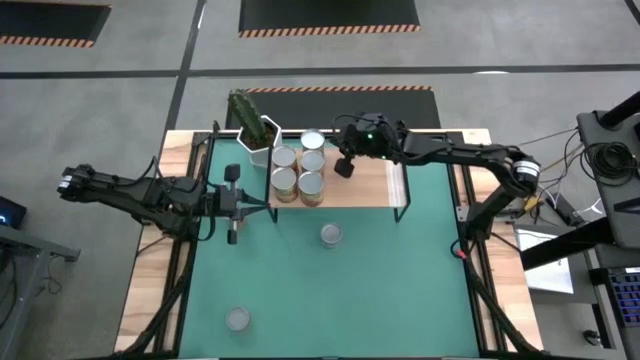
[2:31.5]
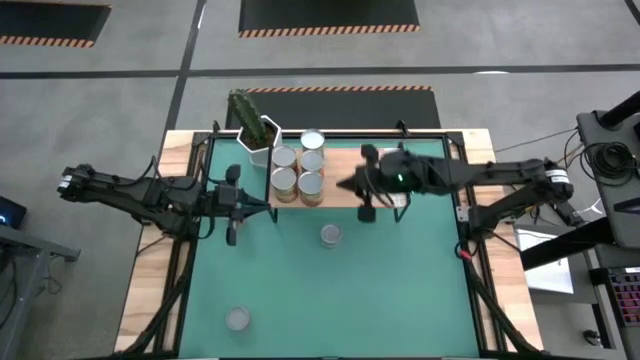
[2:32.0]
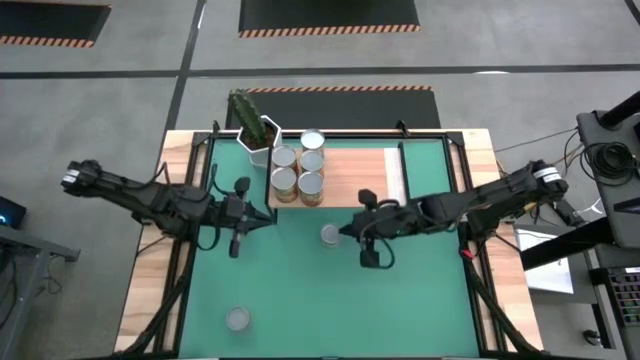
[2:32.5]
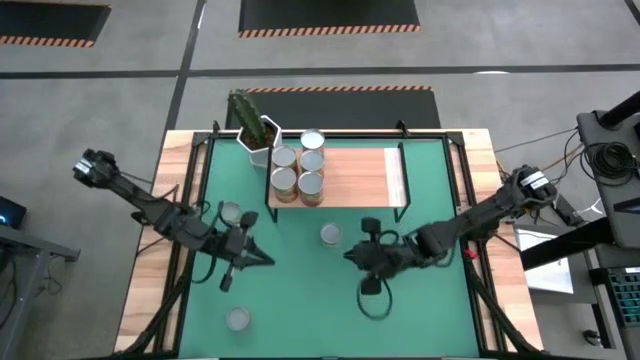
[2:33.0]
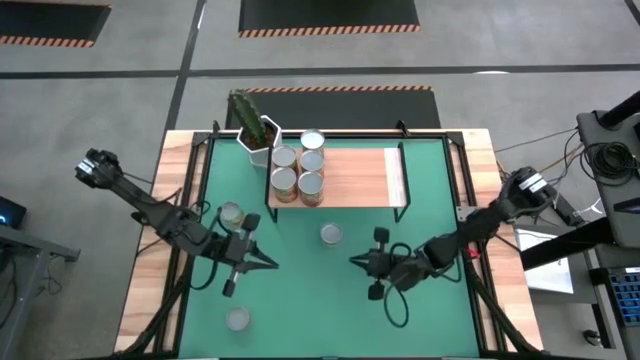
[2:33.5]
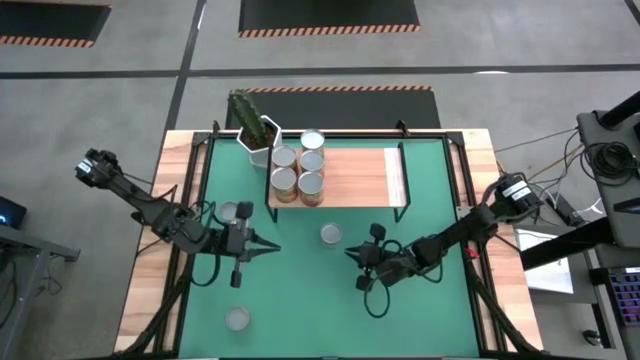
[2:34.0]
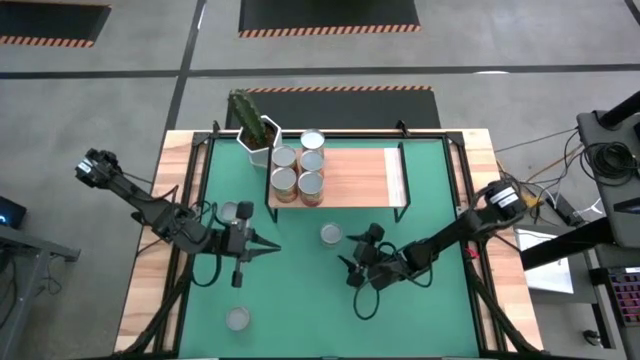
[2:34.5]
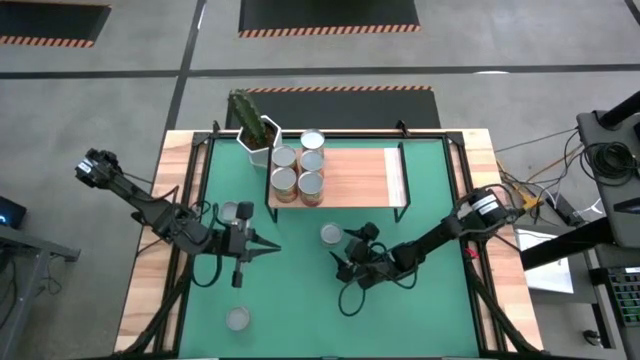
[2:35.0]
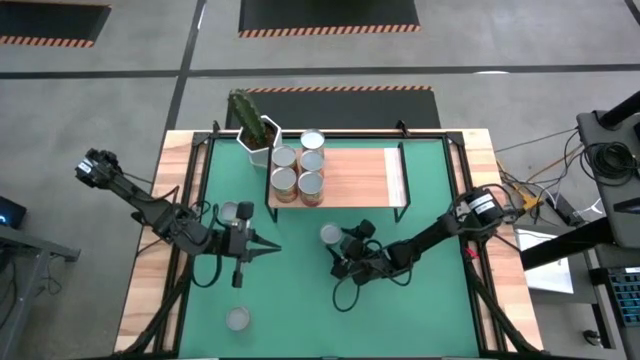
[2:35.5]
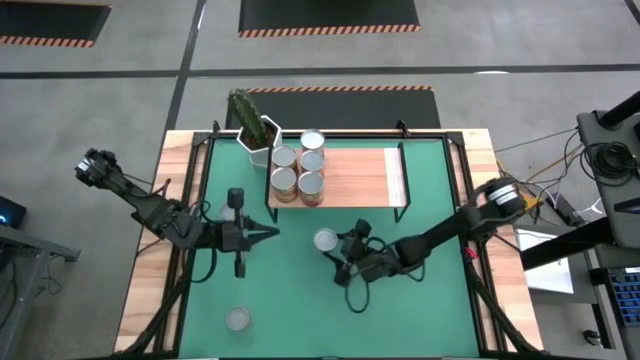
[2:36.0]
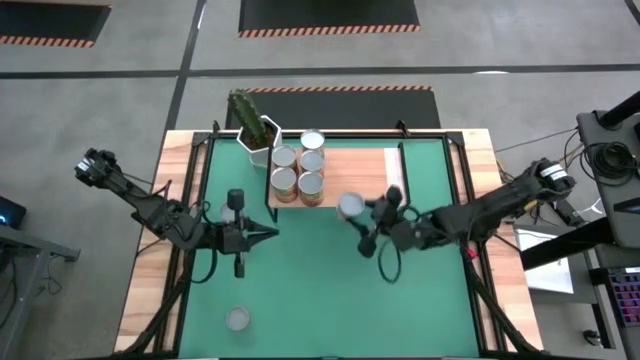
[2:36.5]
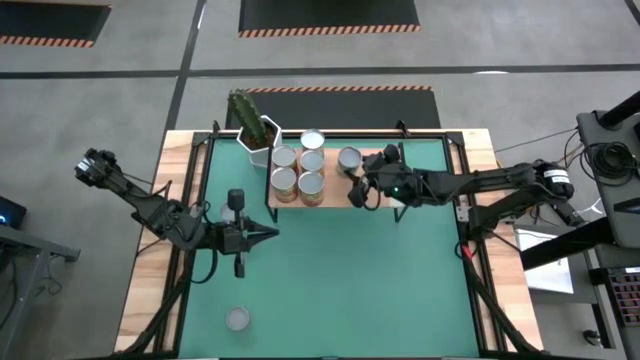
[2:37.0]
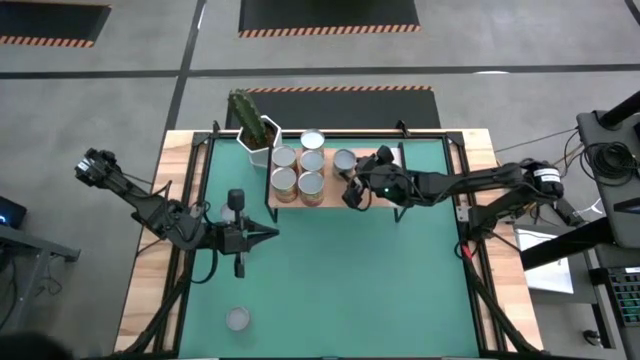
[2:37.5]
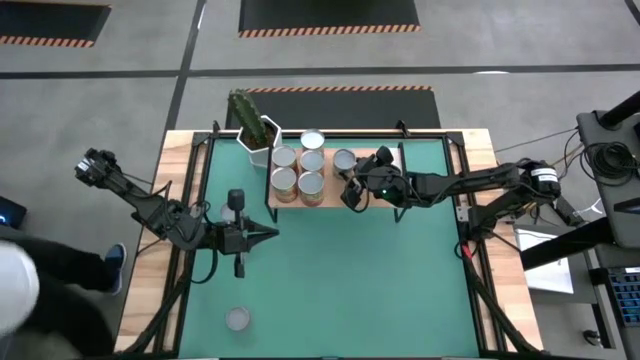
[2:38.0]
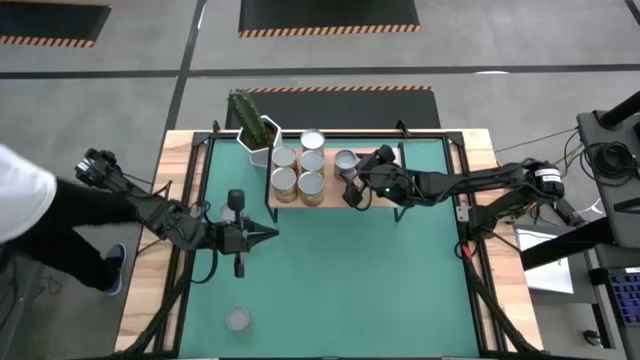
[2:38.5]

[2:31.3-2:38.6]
Task: Pick and place cans onto a shelf
Put the canned chicken soup on the shelf

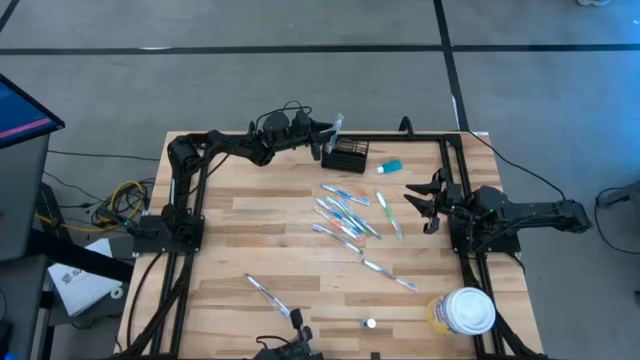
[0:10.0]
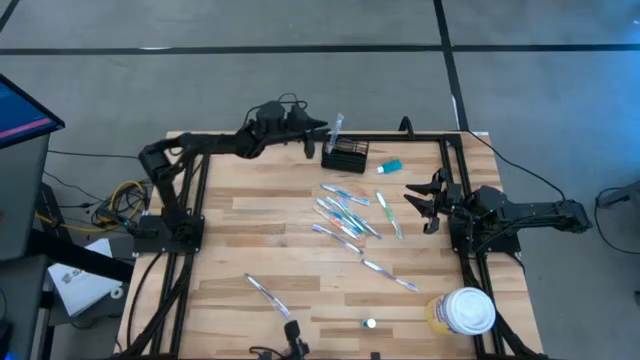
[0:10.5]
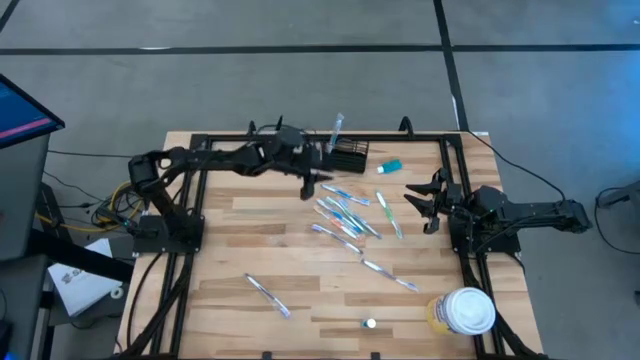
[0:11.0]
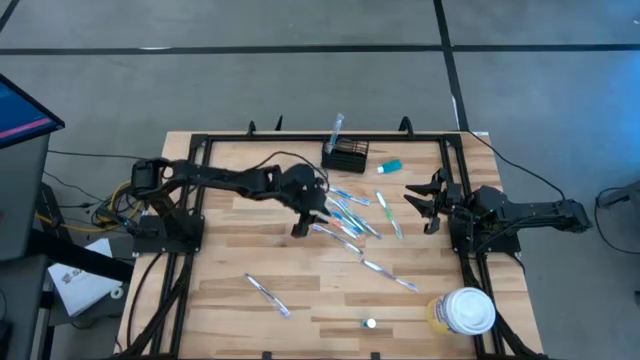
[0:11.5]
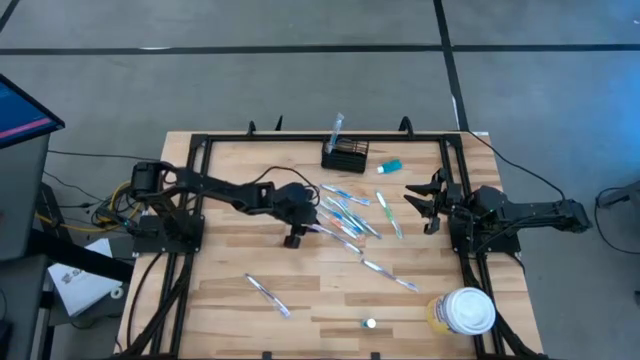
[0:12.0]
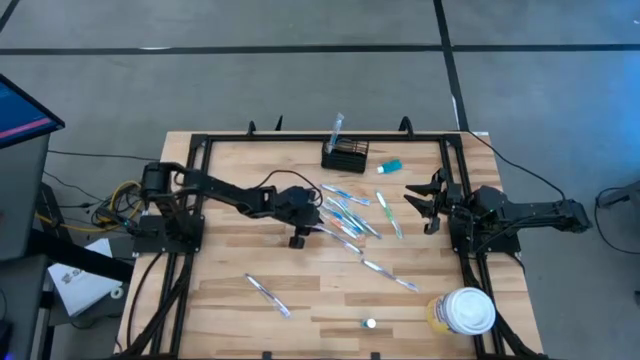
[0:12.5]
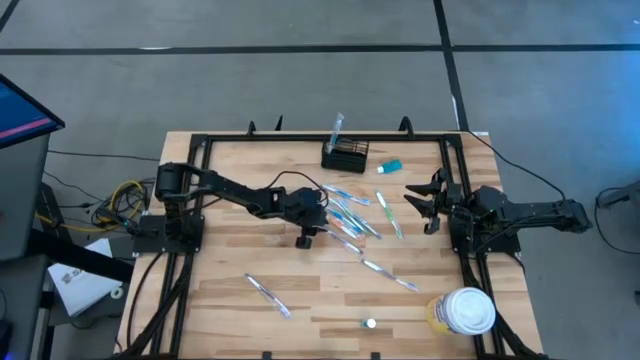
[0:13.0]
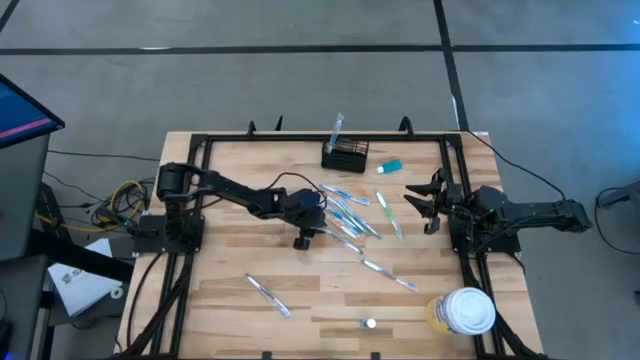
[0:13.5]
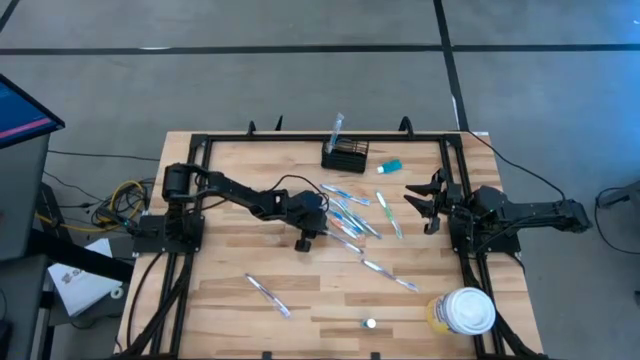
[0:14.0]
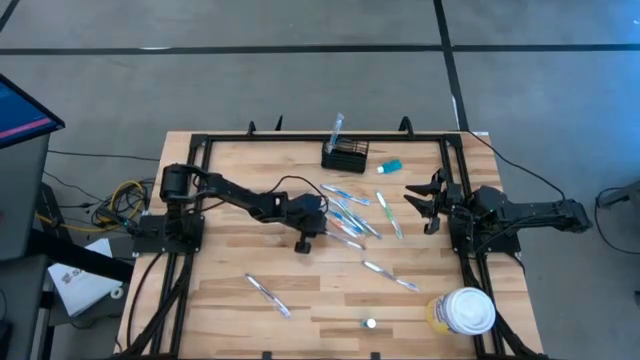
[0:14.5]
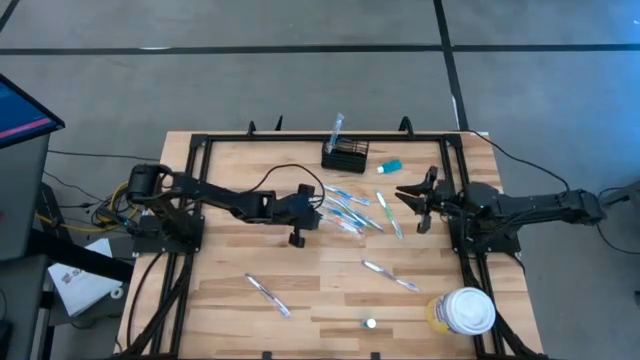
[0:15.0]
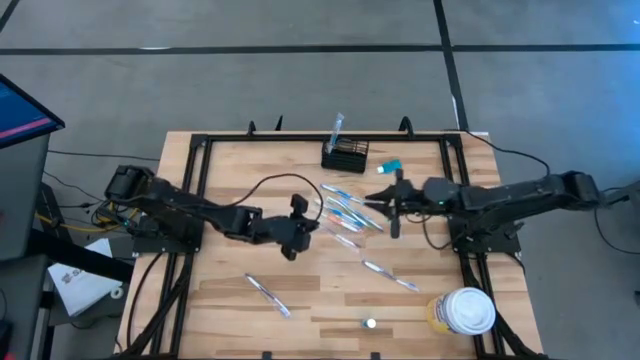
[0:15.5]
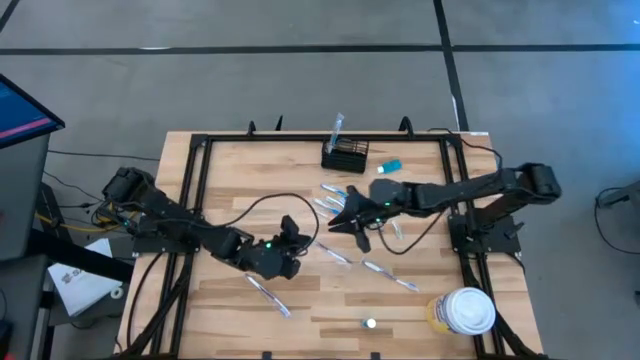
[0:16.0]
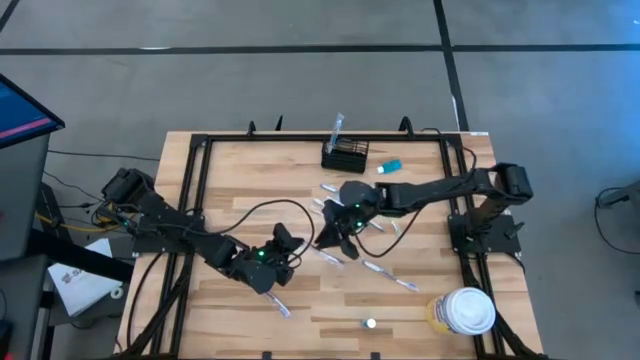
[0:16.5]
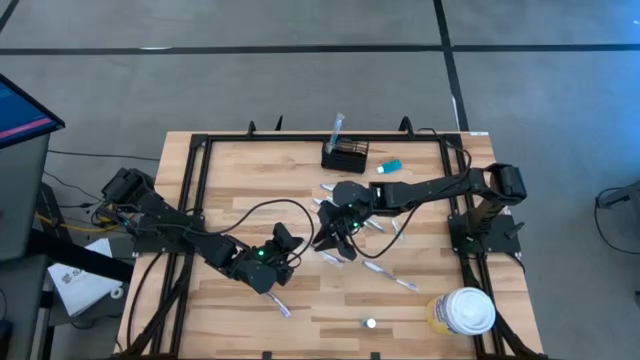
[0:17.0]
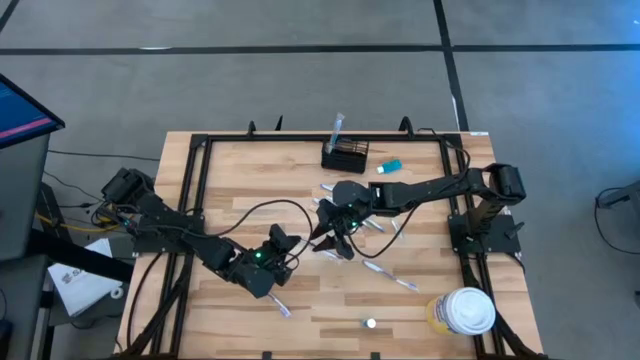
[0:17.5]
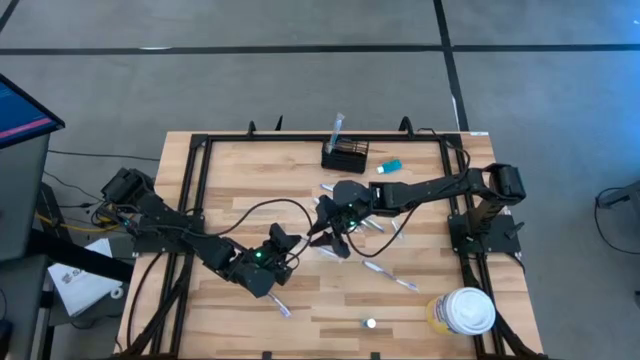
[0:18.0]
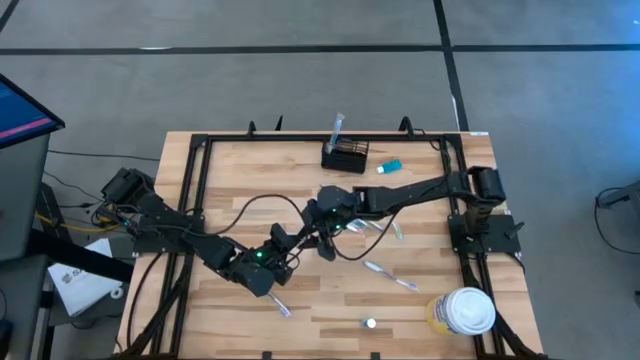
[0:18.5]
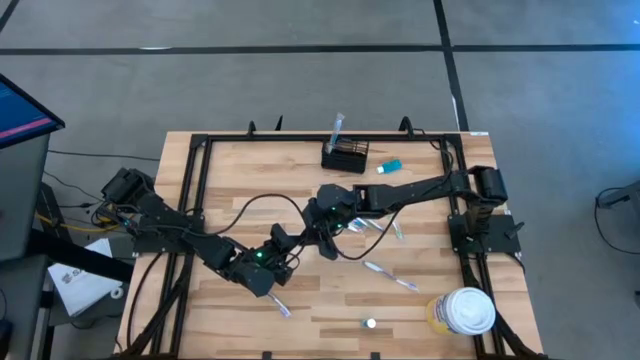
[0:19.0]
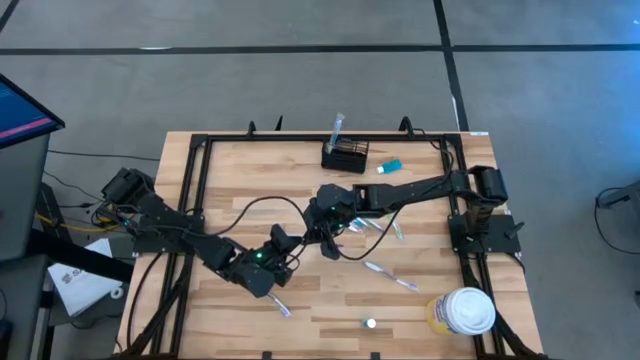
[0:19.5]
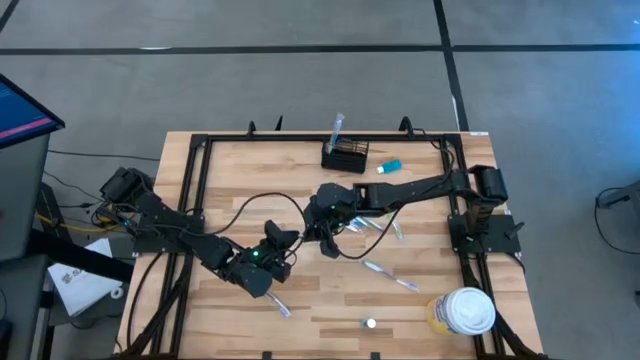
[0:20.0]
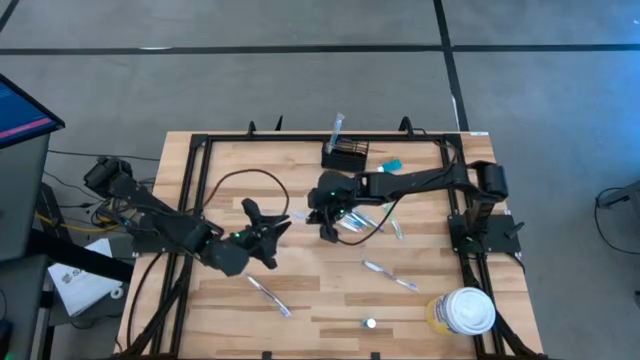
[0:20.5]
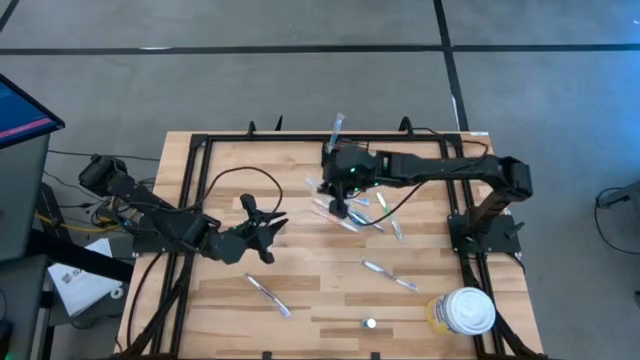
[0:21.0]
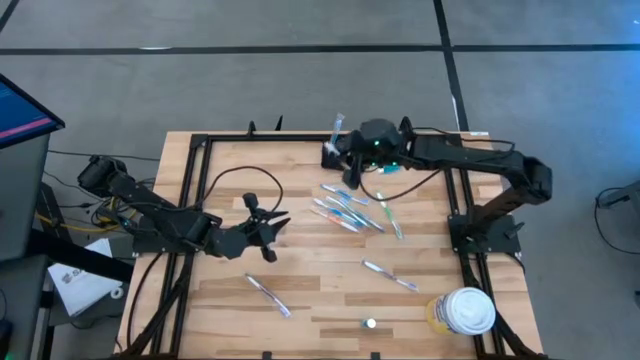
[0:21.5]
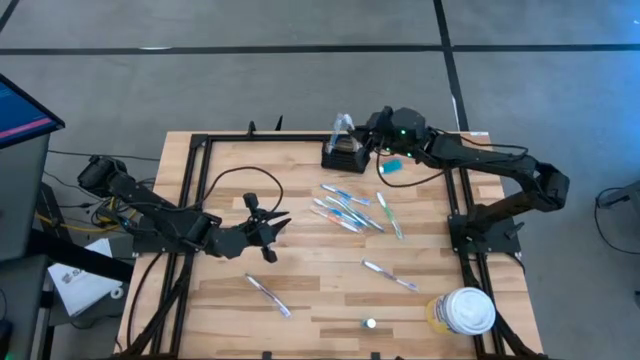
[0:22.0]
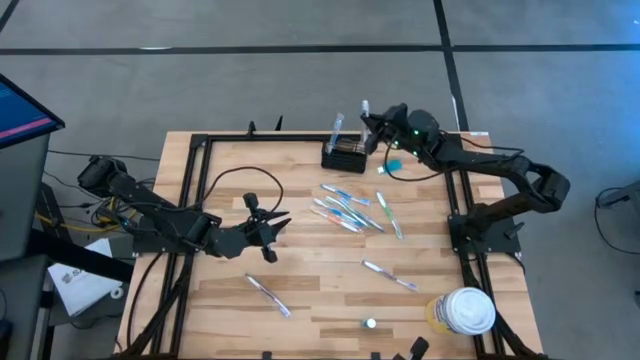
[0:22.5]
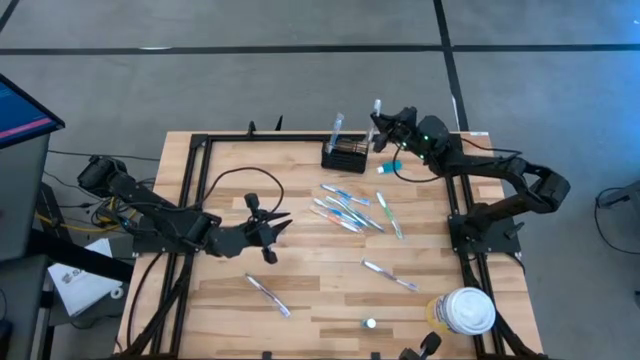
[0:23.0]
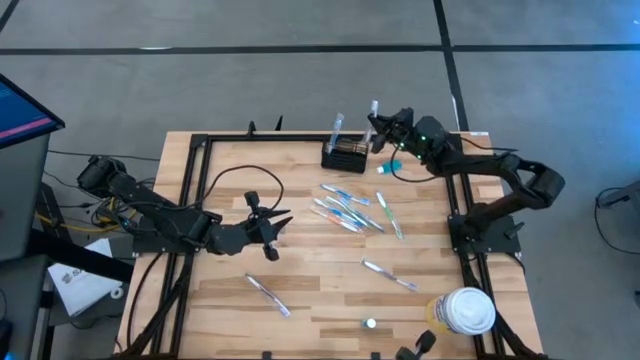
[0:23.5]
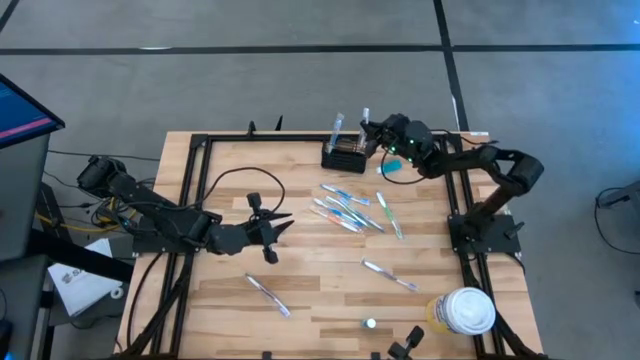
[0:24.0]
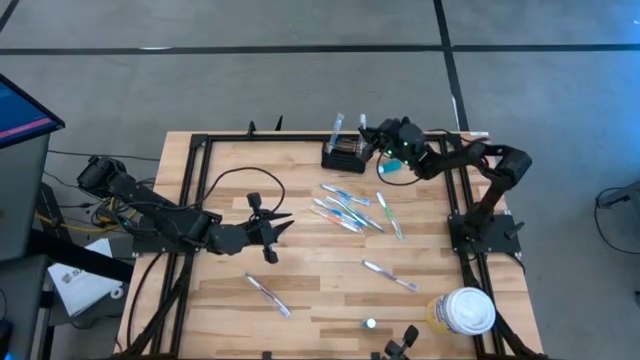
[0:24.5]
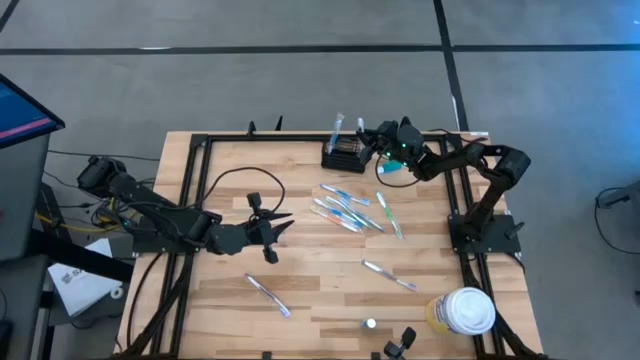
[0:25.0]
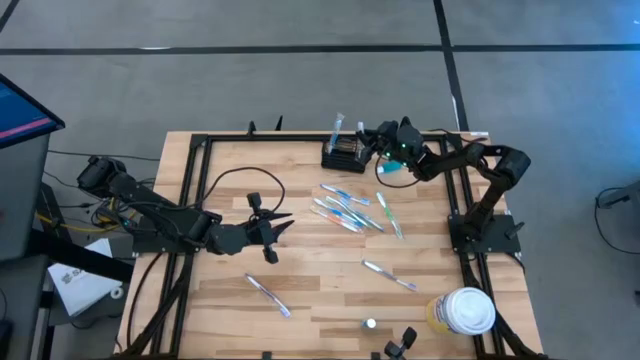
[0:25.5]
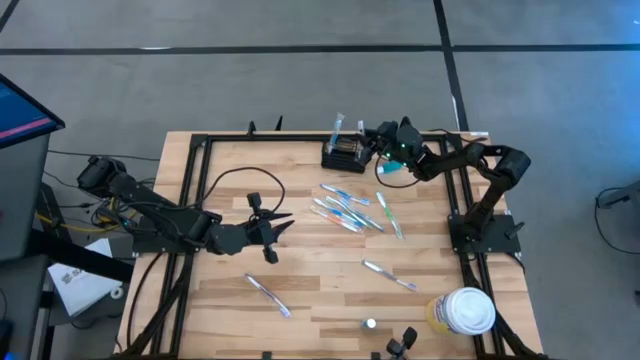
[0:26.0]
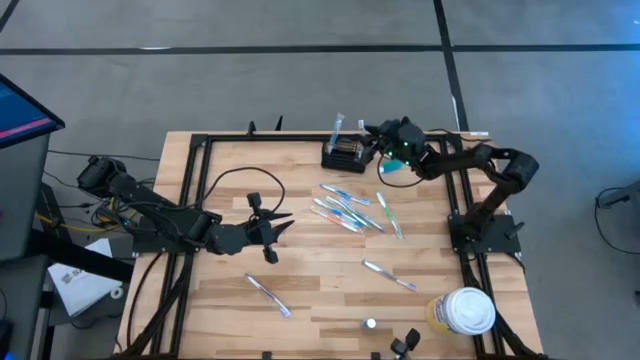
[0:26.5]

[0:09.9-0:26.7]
Task: Pick & Place toothbrushing station
Put the top violet toothbrush into the mesh organizer
